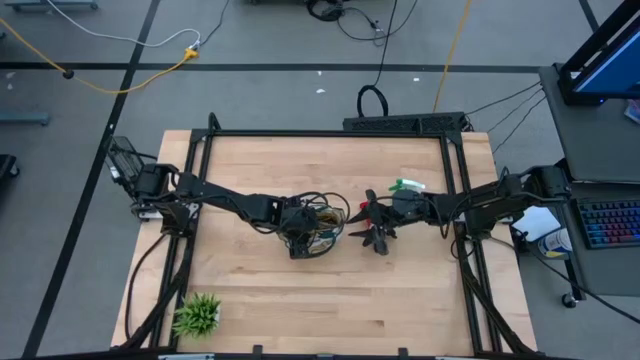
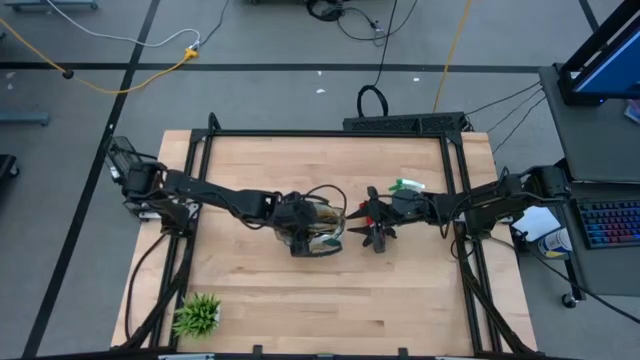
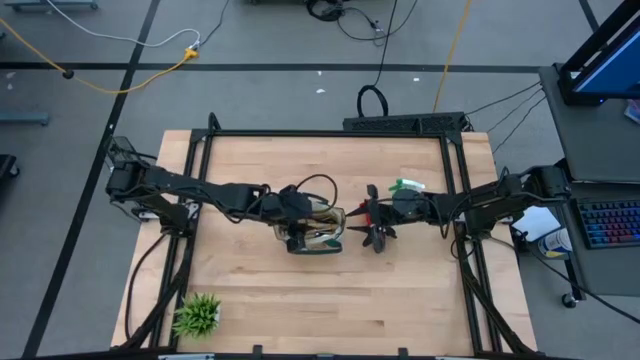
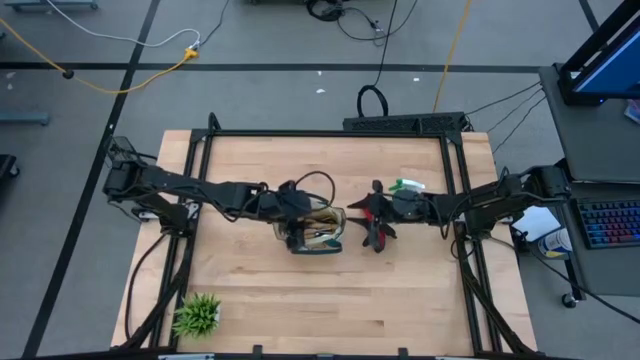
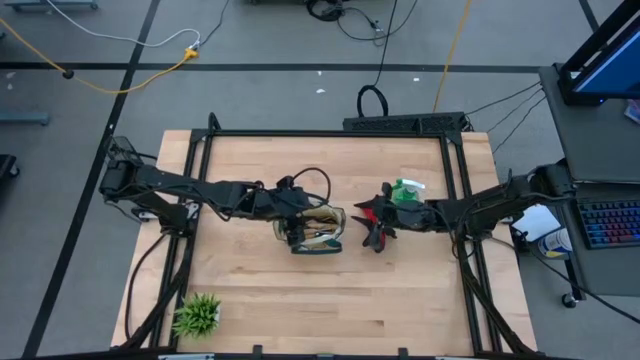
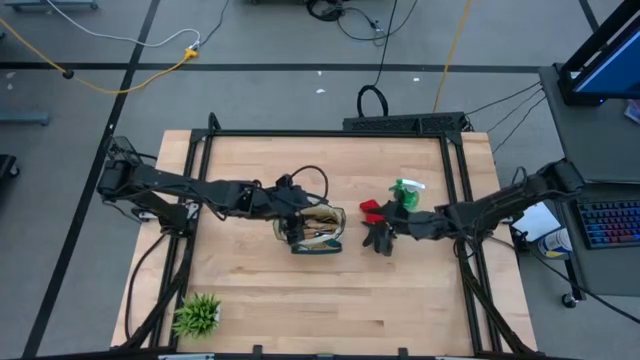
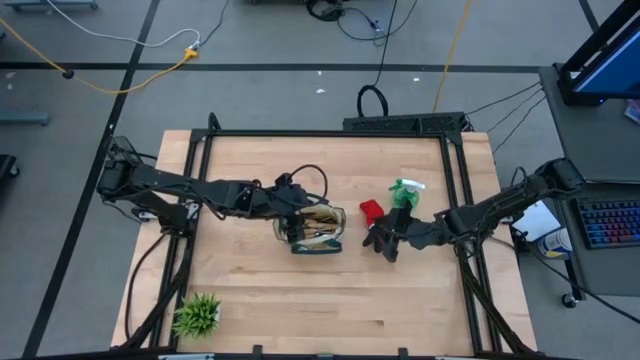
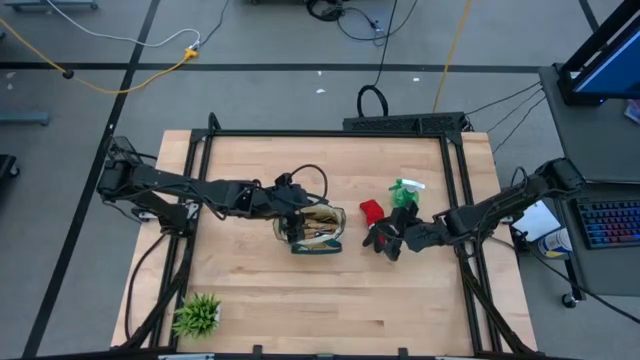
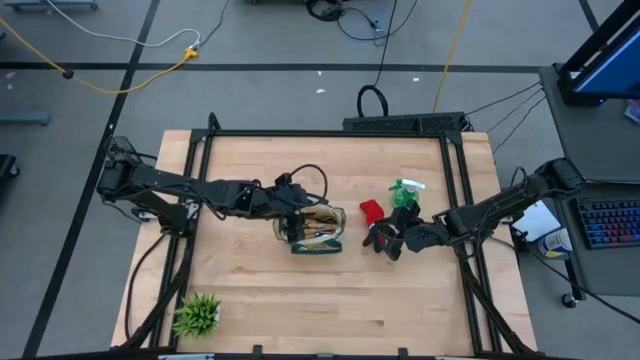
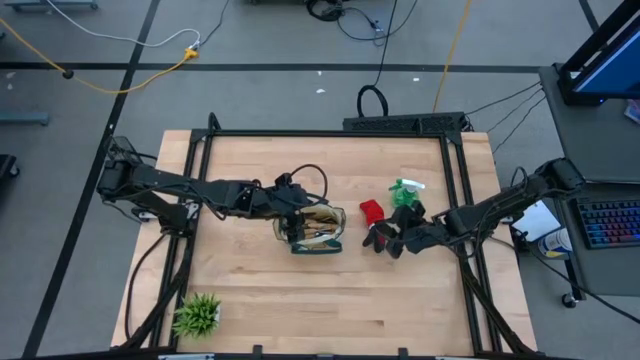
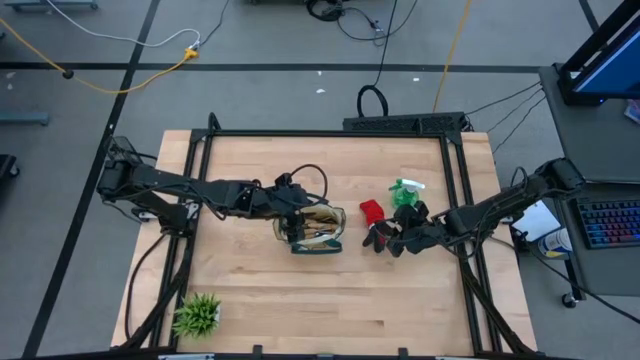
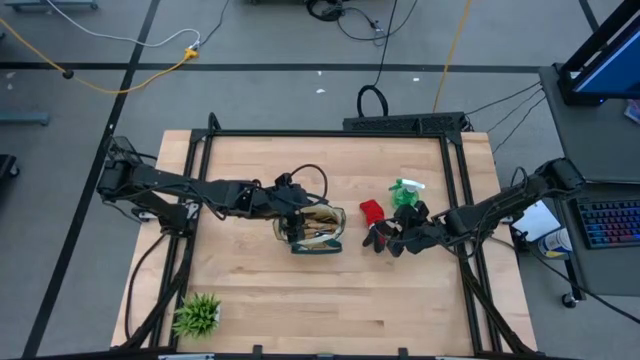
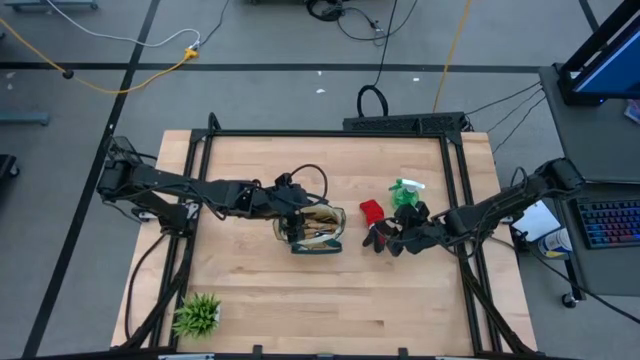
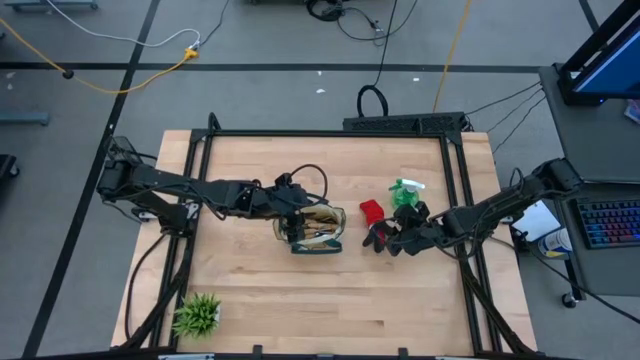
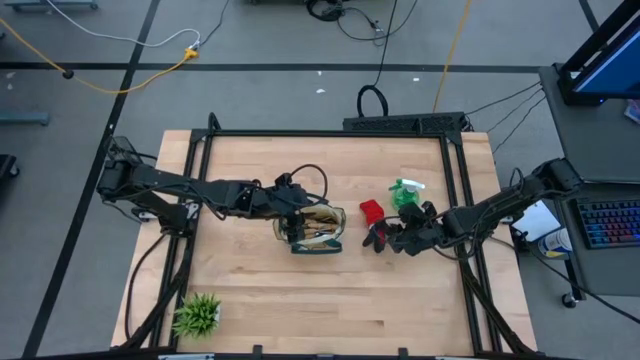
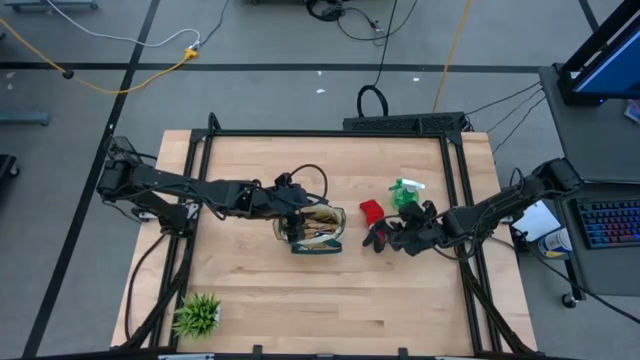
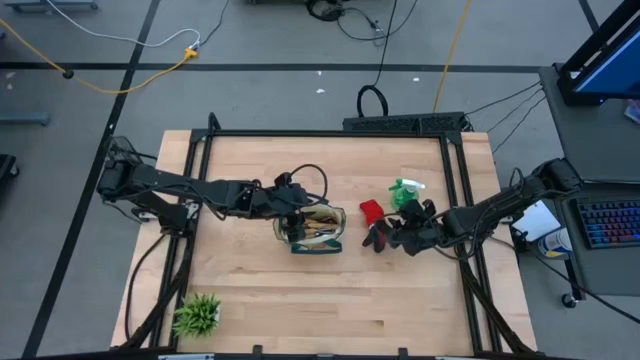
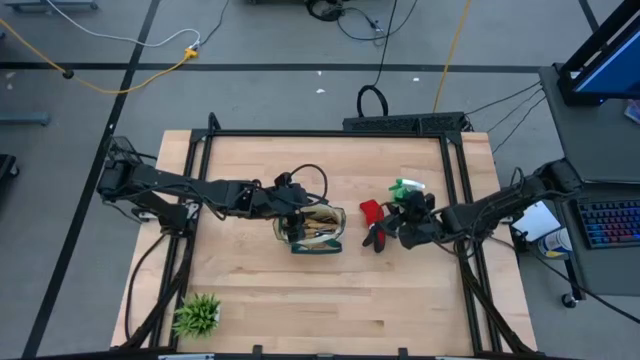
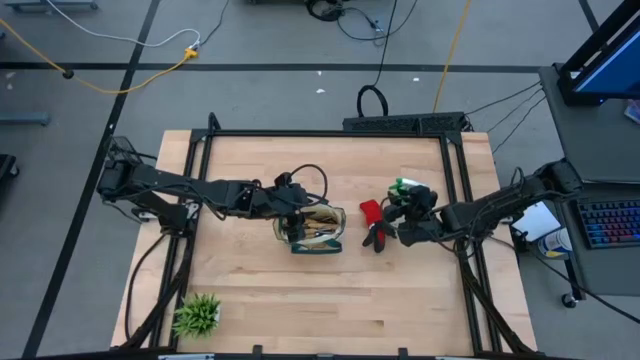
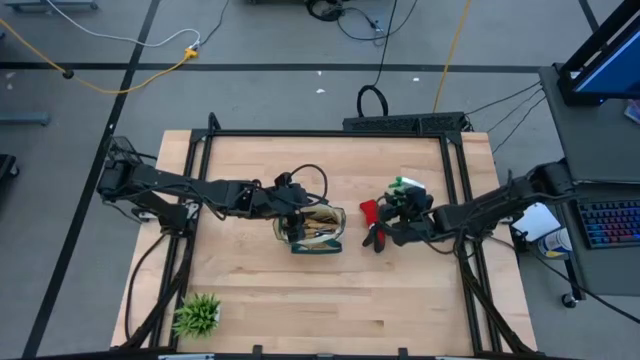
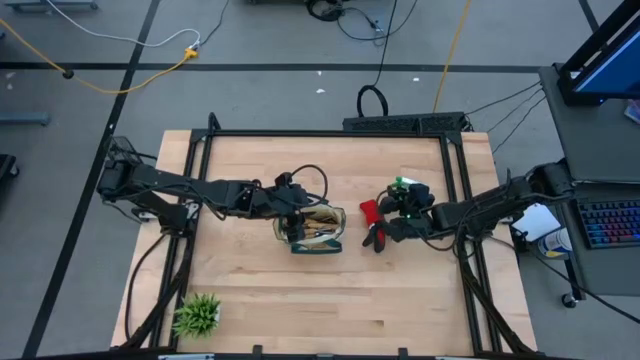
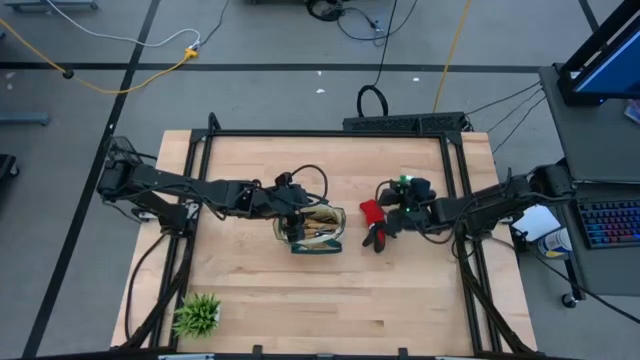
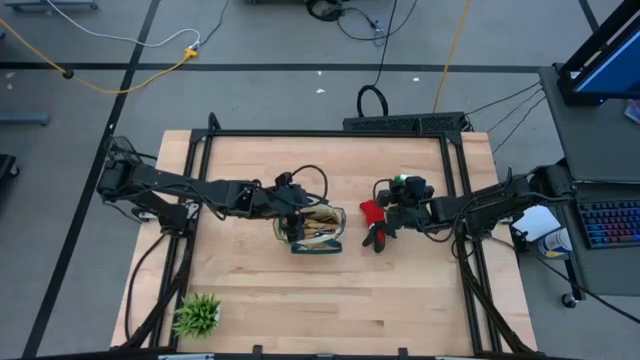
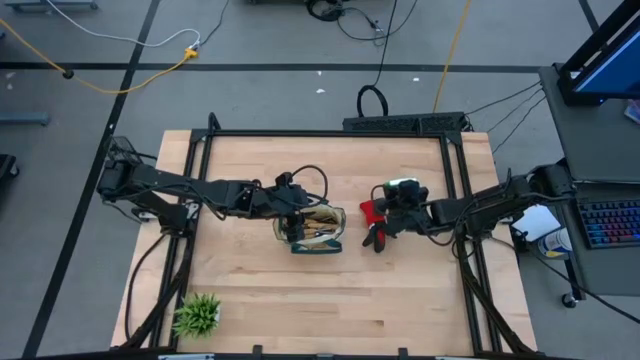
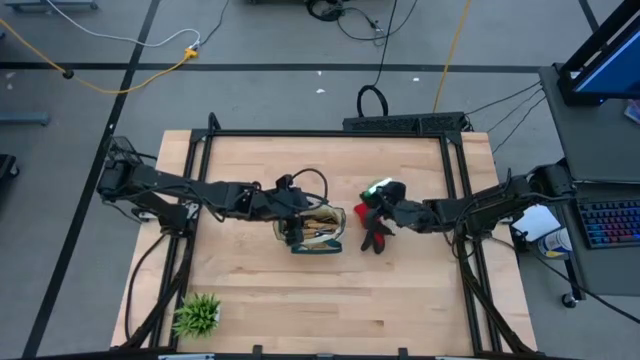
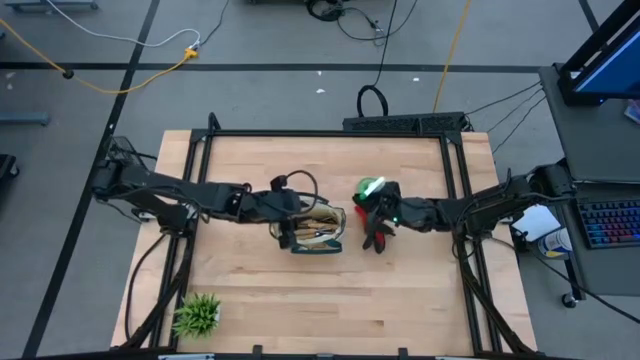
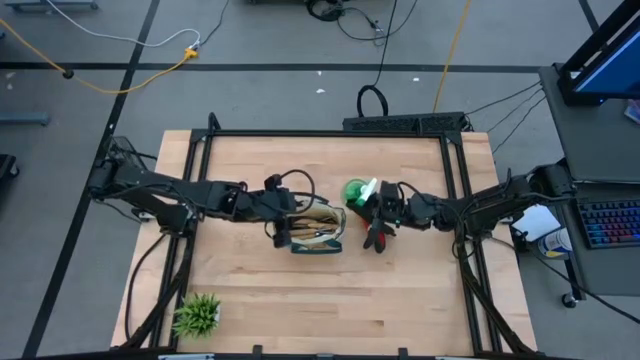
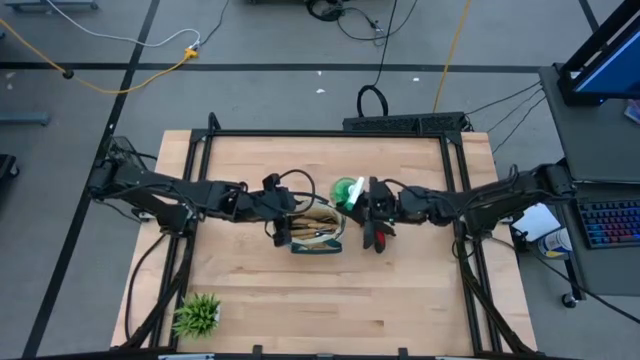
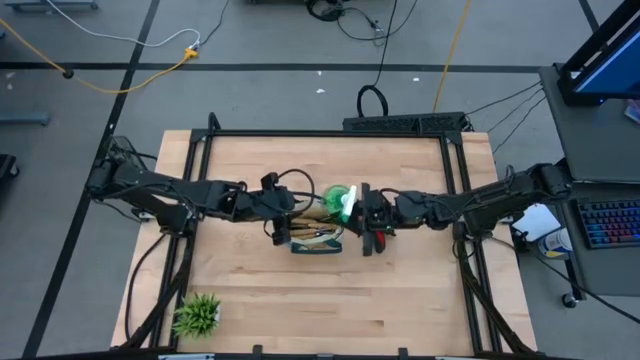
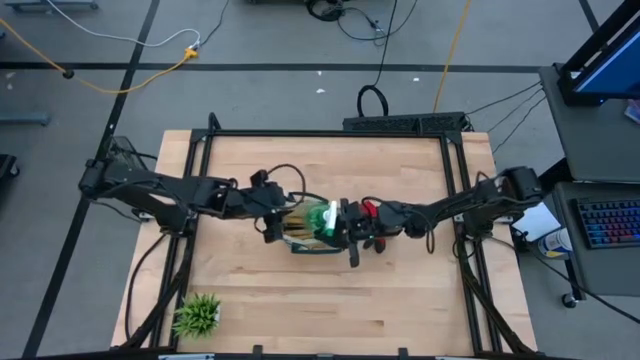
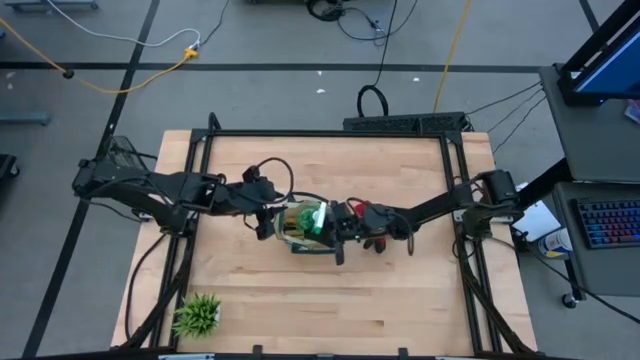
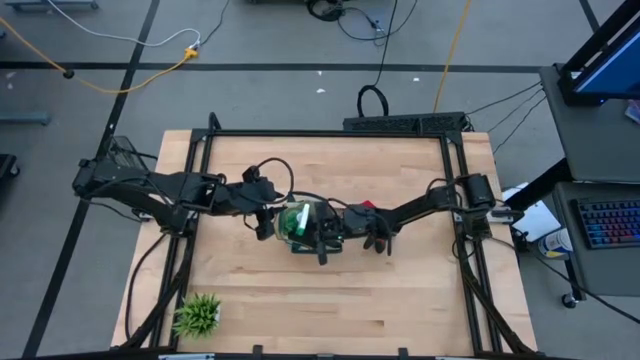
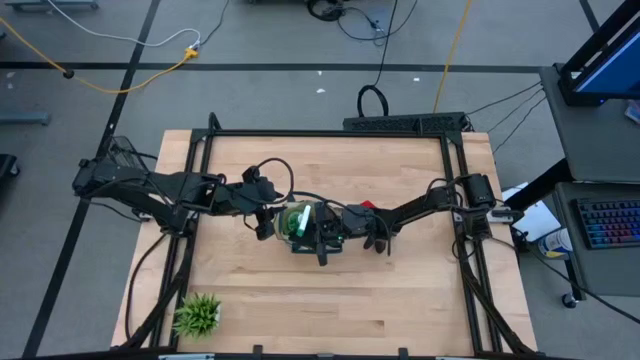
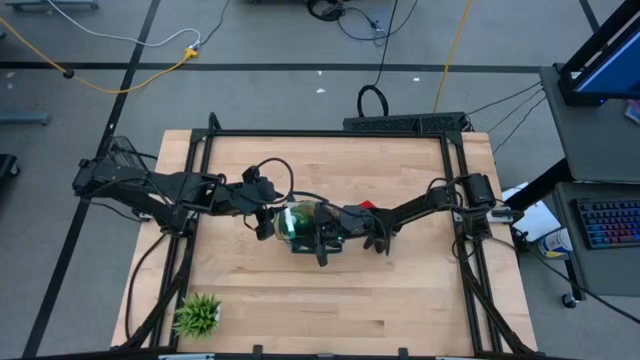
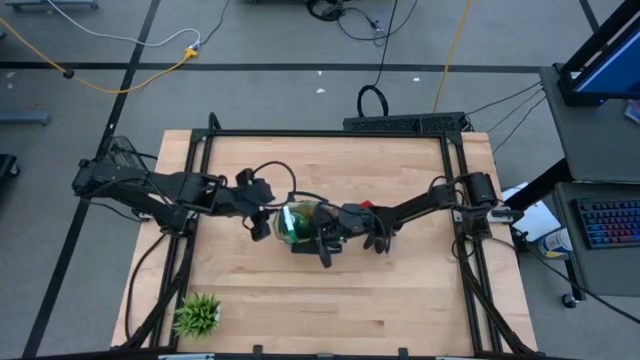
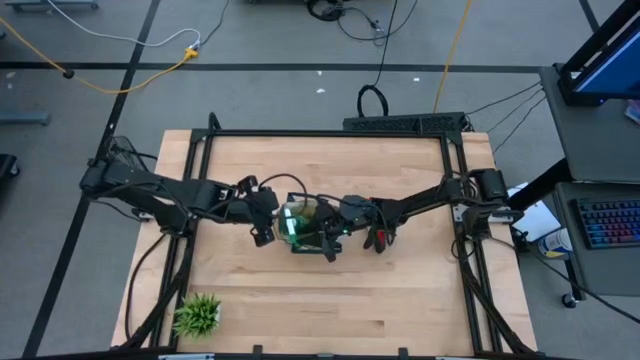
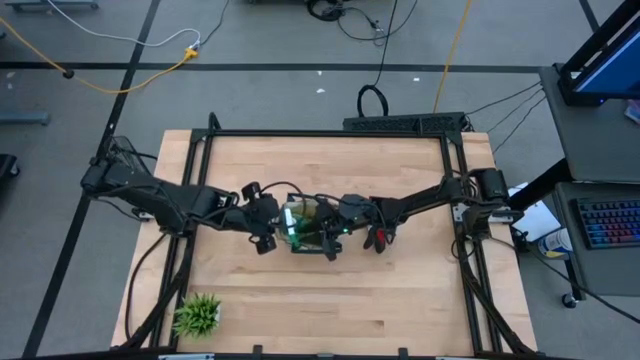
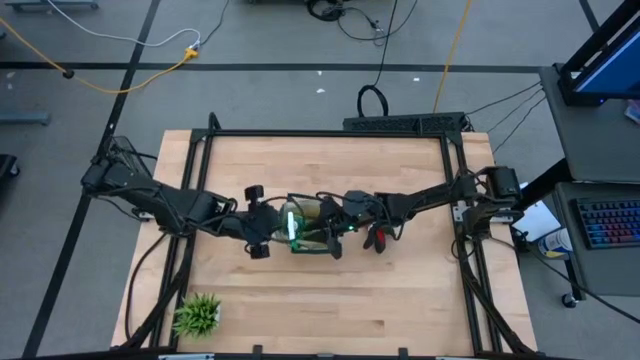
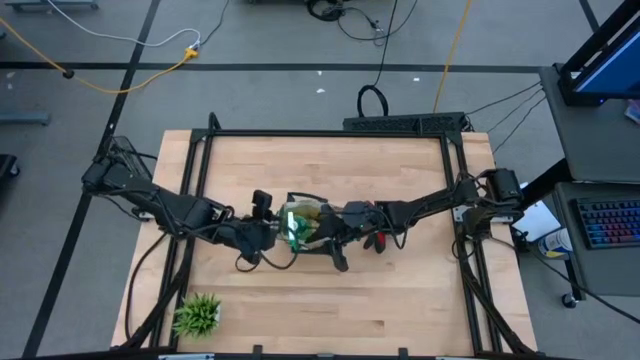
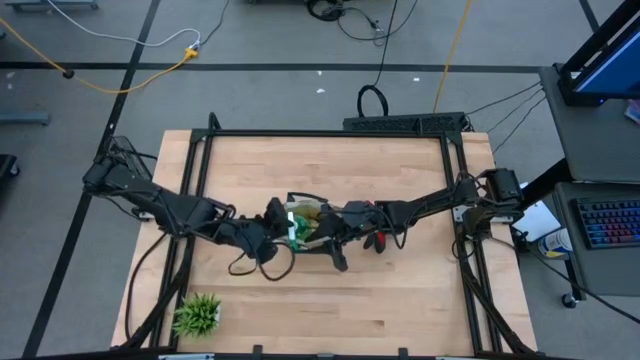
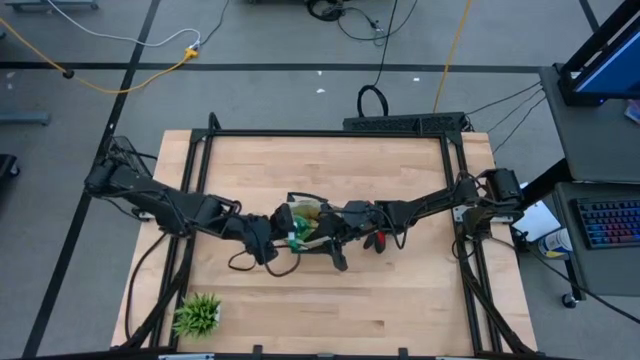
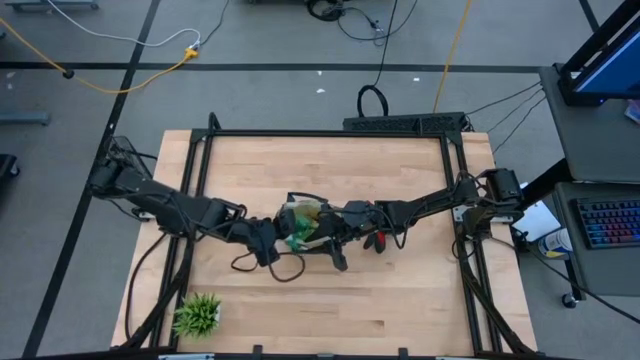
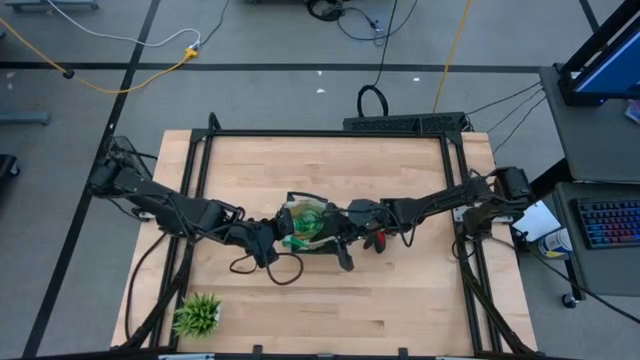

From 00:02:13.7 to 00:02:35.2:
Task: Pick & Place Garden tools in Gardening bag
Put the green sprayer into the green gardening bag
